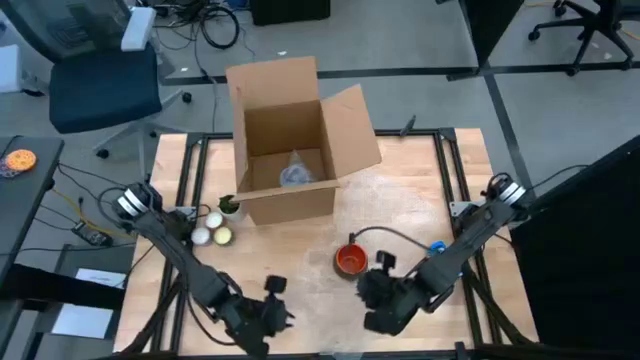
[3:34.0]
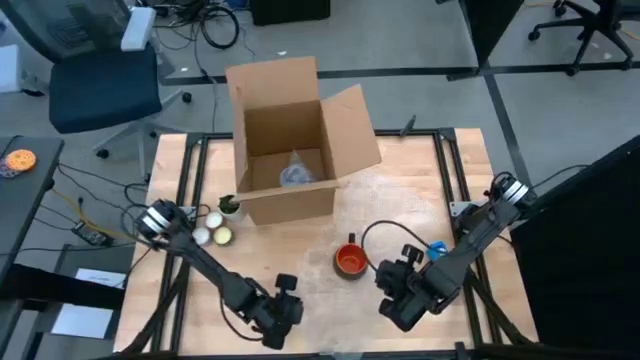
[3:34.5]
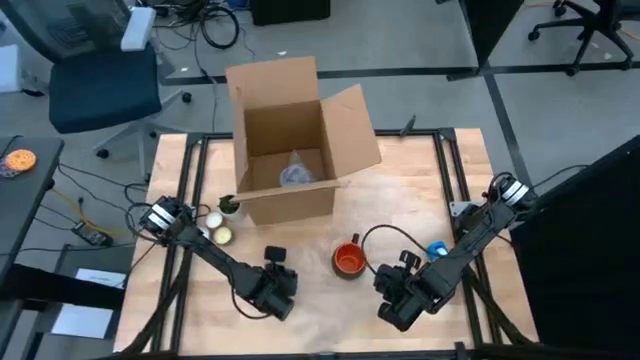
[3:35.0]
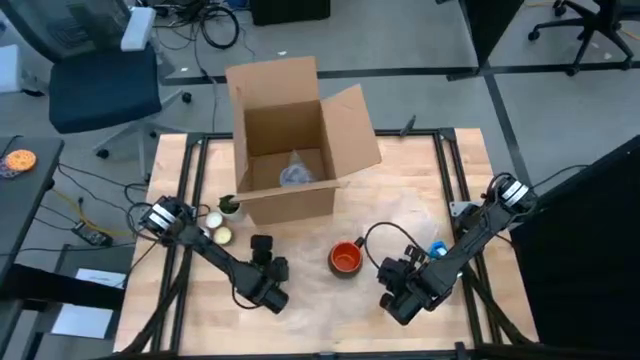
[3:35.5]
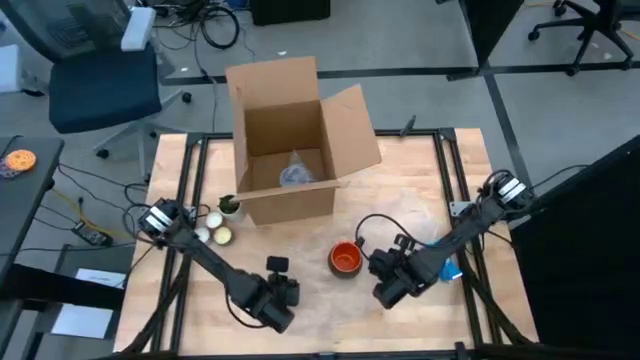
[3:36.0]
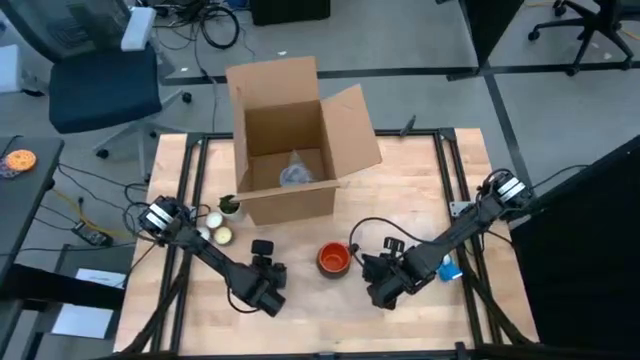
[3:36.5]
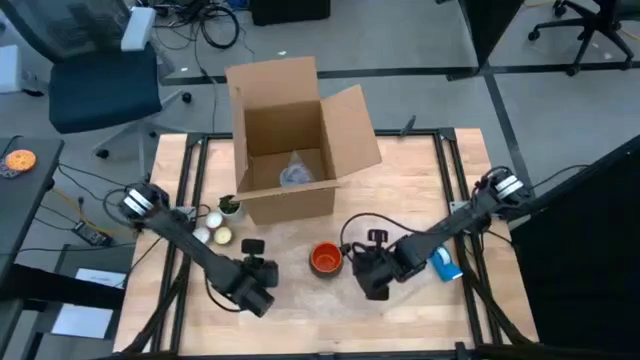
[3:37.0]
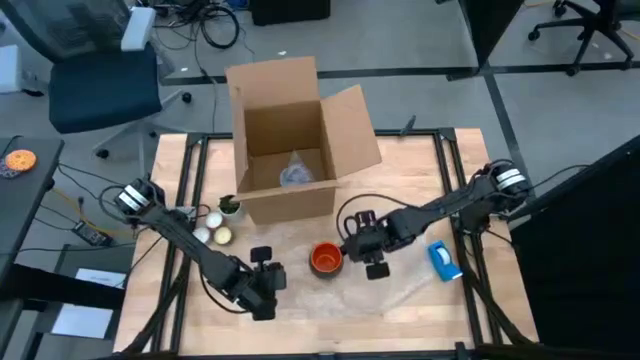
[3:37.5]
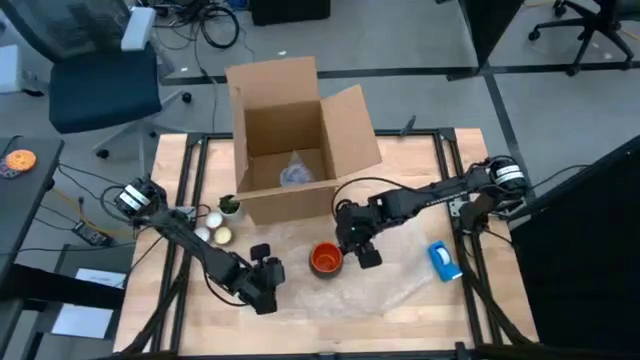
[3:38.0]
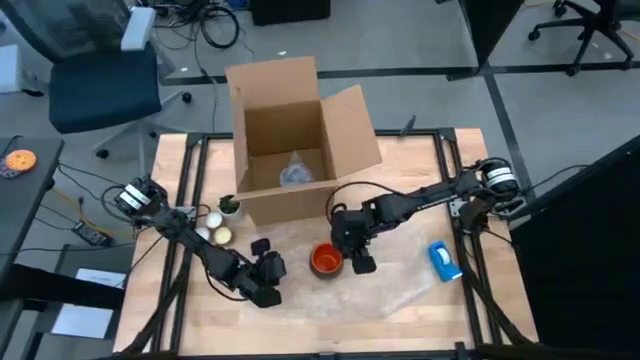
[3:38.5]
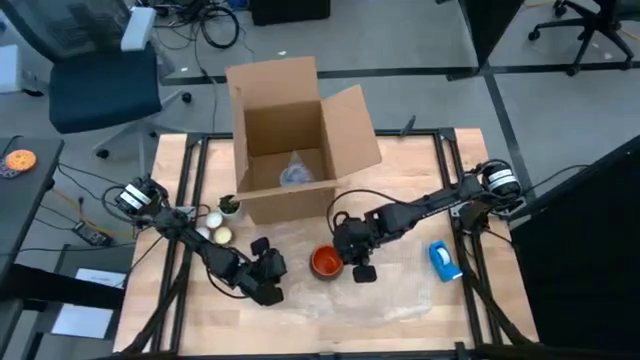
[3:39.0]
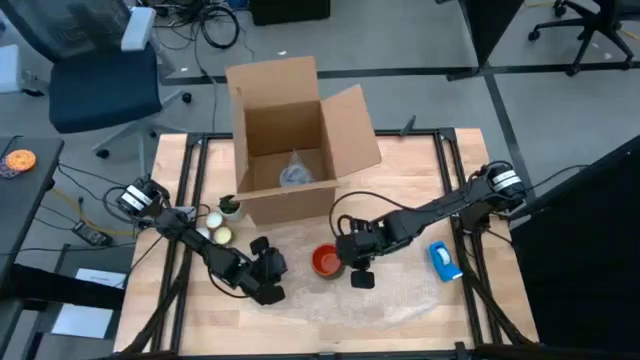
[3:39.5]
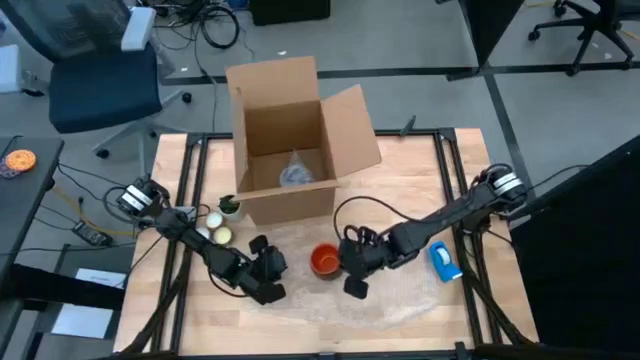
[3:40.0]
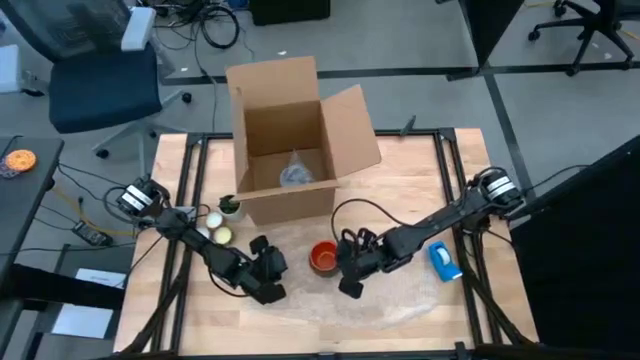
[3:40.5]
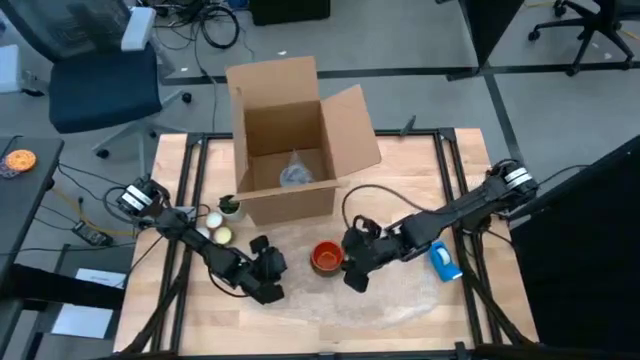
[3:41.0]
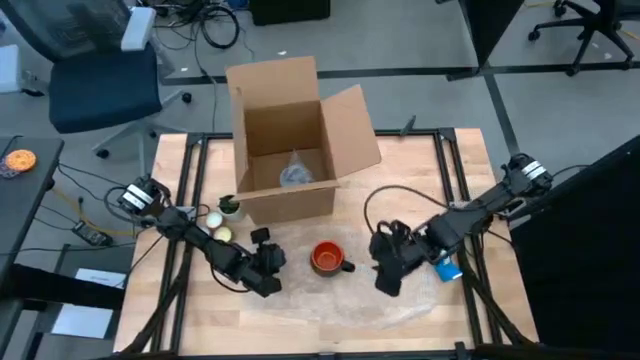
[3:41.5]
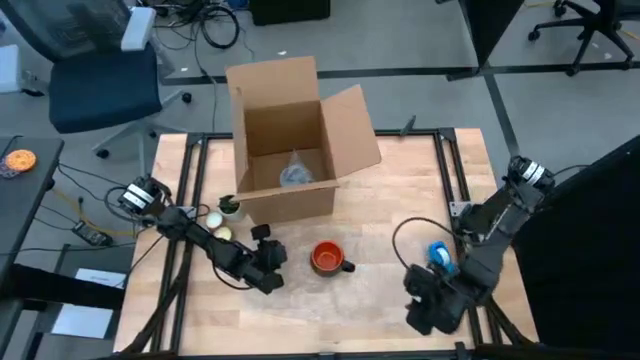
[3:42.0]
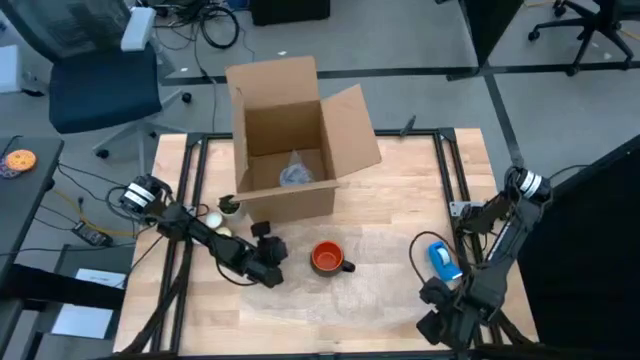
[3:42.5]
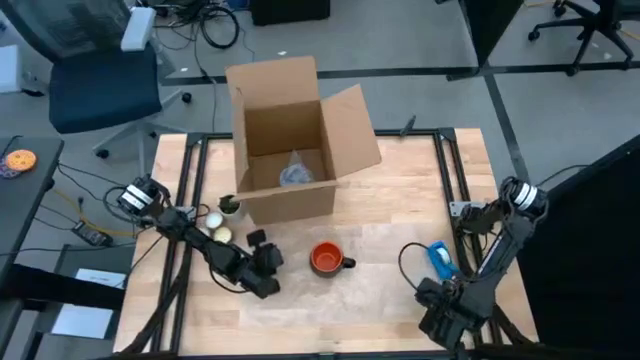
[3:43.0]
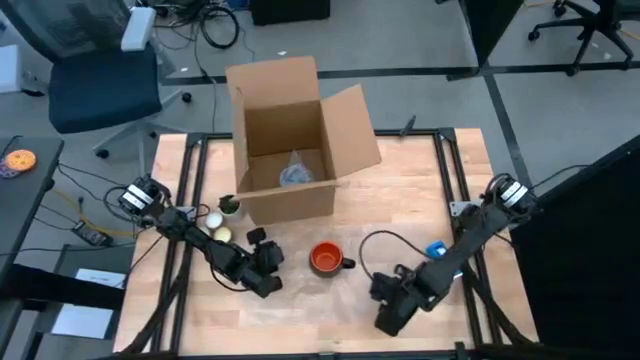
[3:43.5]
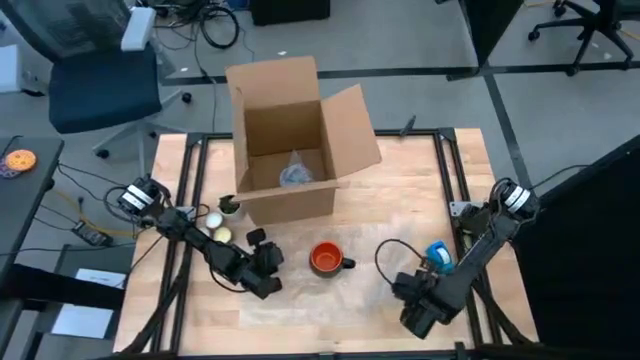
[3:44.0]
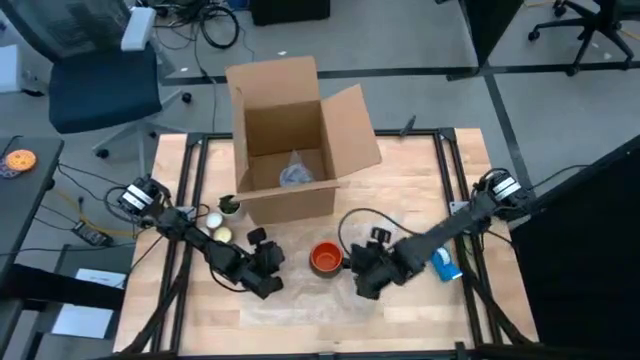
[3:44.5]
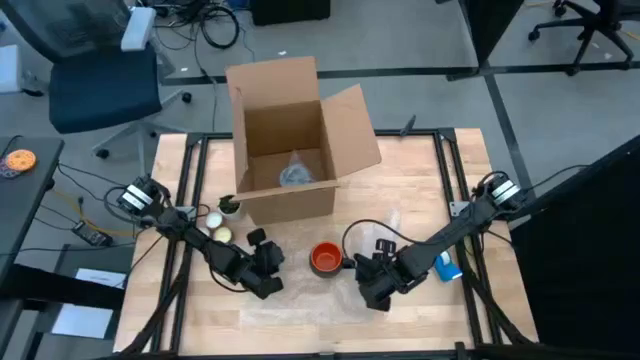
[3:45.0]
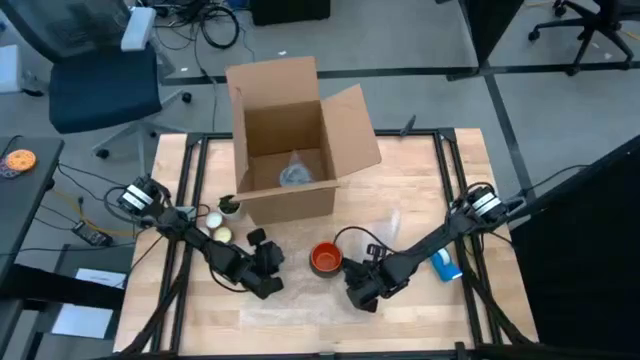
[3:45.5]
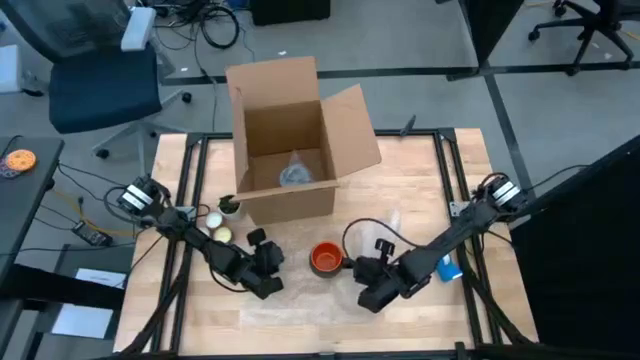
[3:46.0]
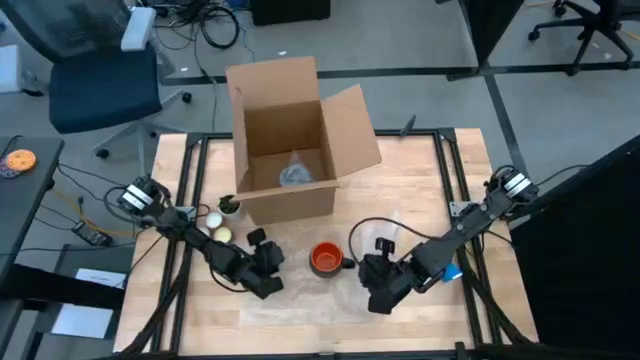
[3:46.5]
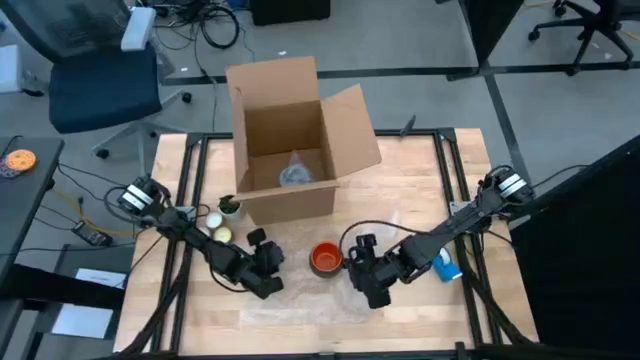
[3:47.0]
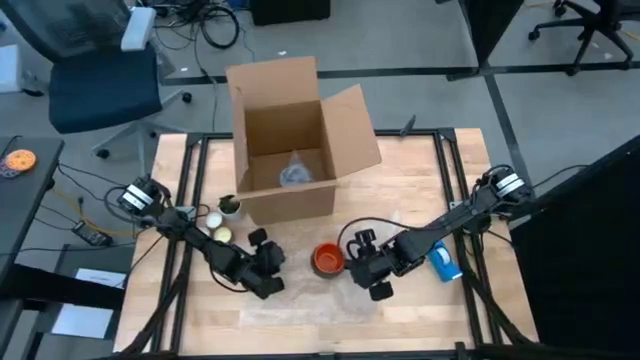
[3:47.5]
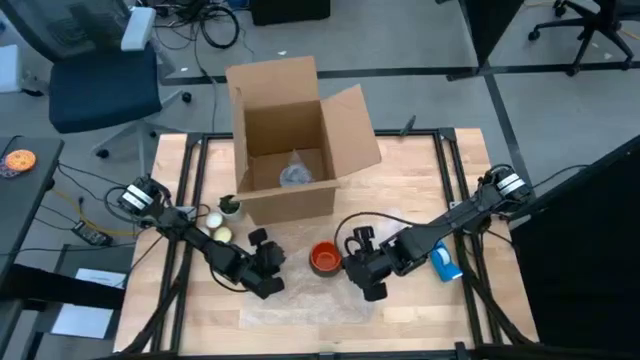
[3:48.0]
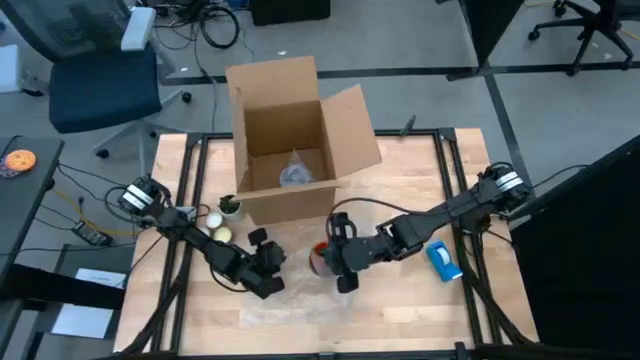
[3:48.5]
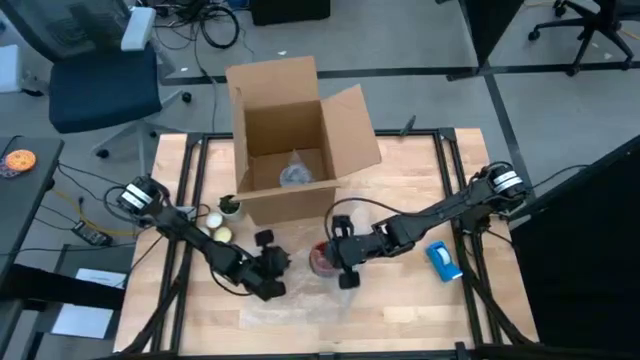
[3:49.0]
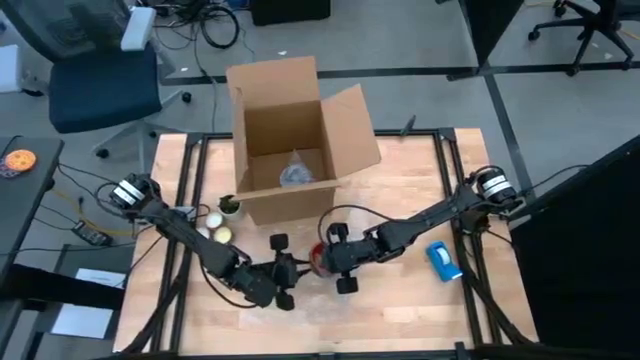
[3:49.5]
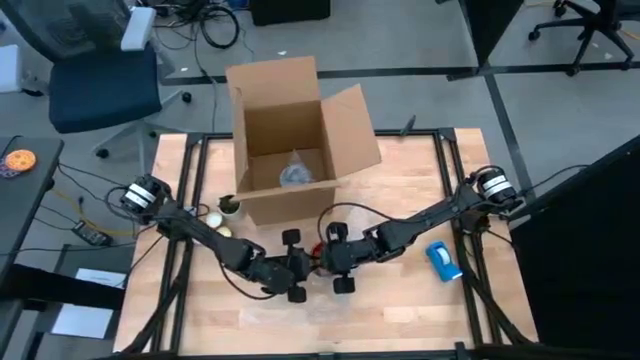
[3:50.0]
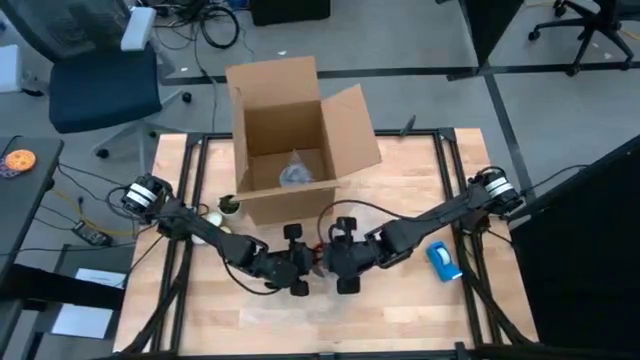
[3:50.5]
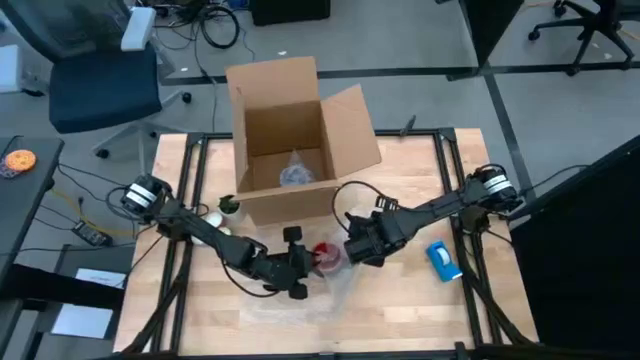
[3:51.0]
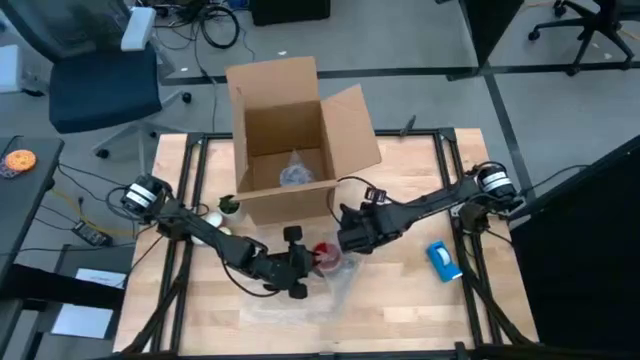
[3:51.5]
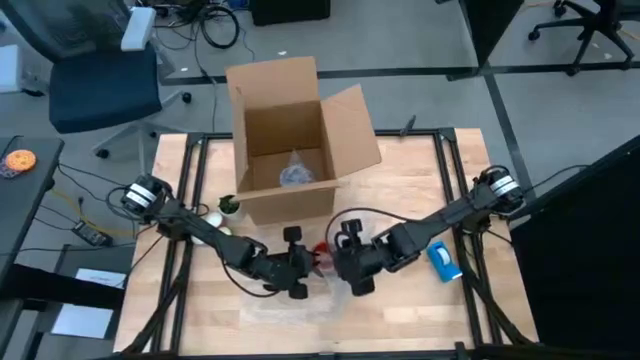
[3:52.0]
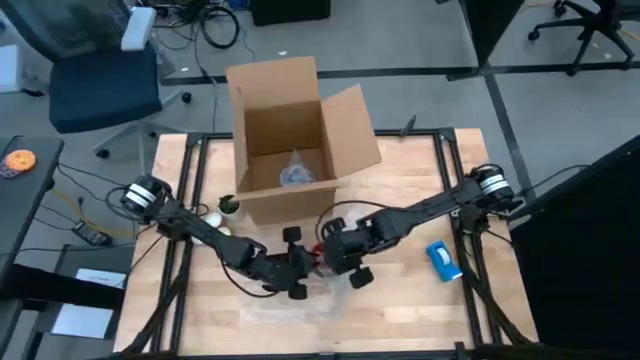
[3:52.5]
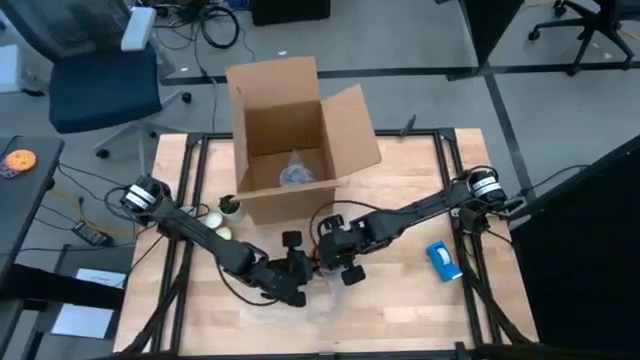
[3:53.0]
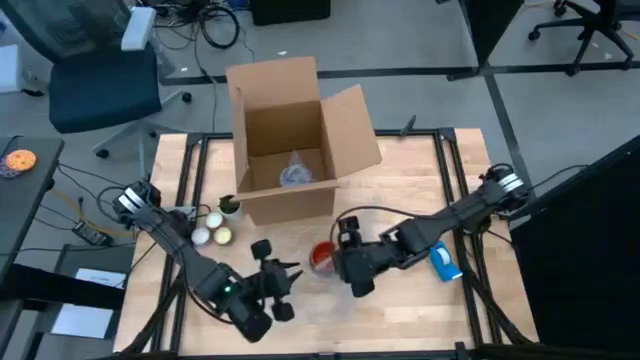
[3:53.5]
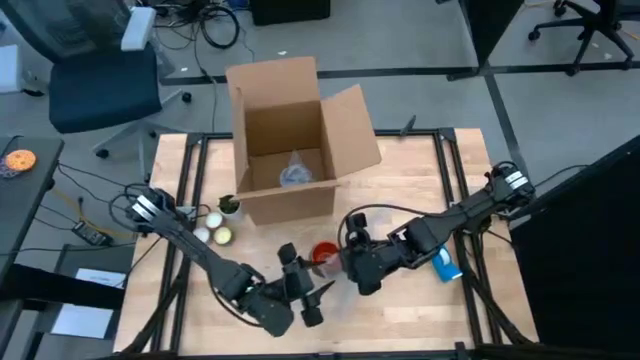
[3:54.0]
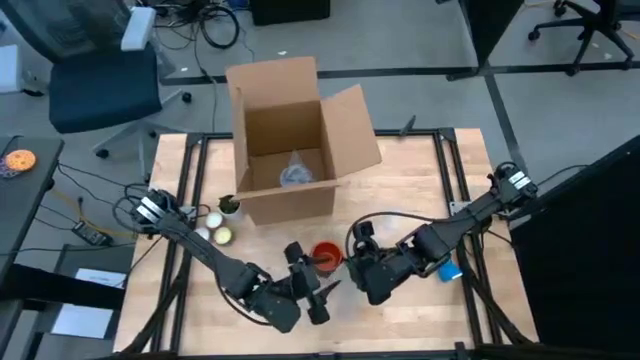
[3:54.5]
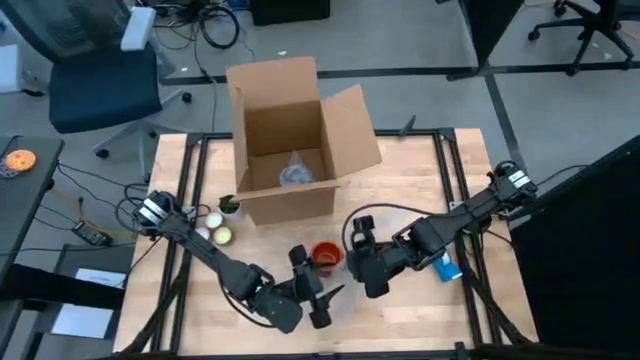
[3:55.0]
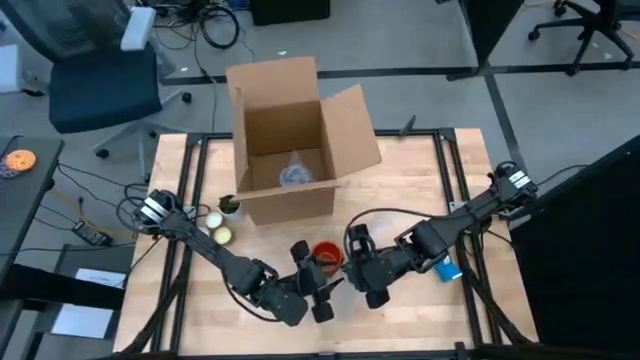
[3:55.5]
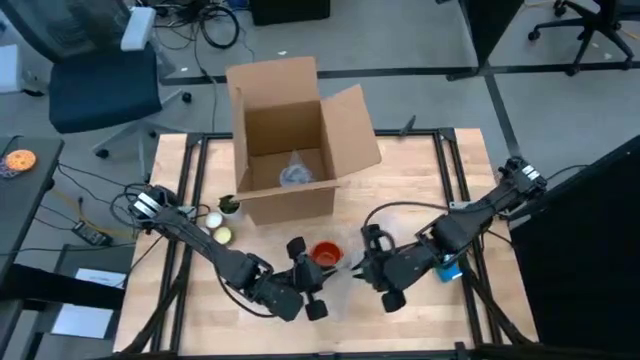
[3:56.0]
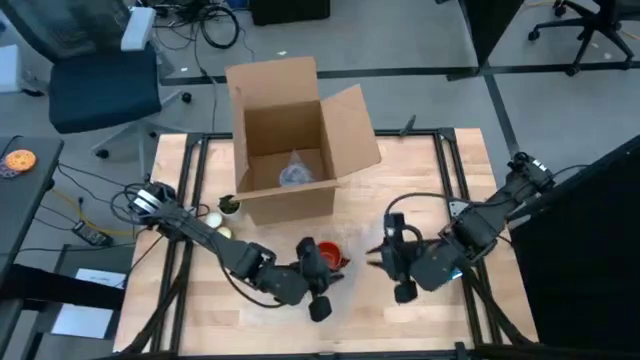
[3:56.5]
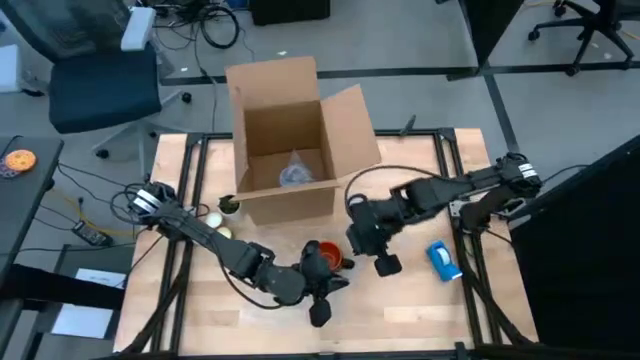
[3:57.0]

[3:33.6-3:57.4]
Task: wrap mug
Wrap the black mug with bubble wrap
